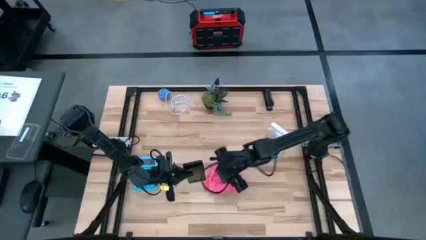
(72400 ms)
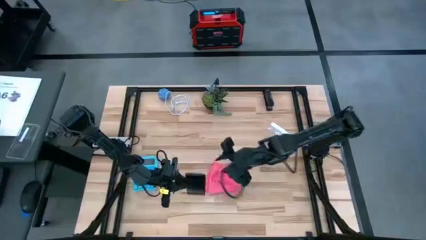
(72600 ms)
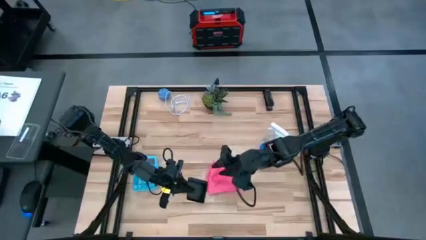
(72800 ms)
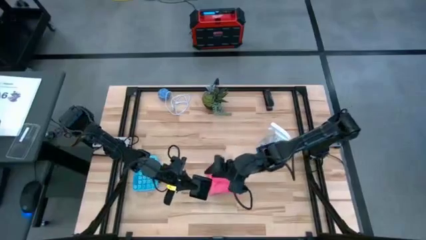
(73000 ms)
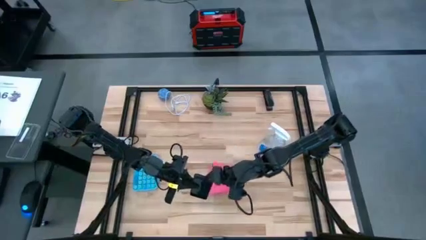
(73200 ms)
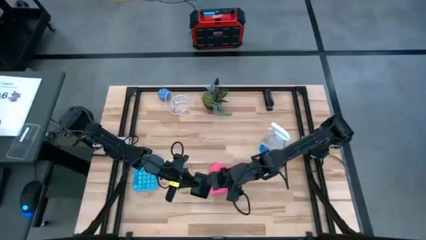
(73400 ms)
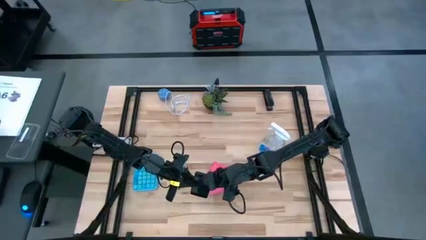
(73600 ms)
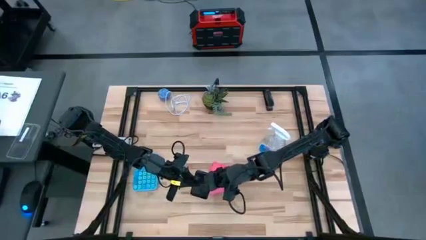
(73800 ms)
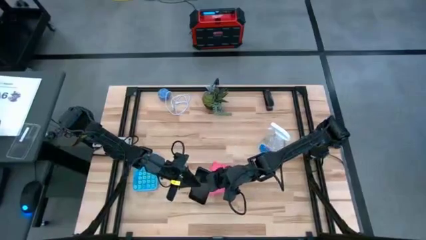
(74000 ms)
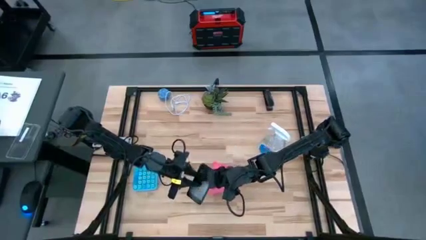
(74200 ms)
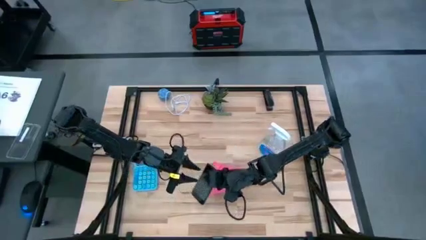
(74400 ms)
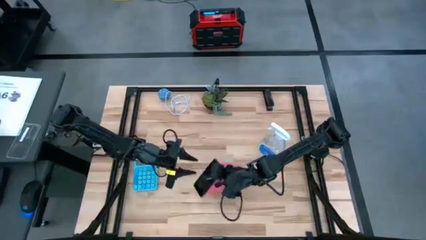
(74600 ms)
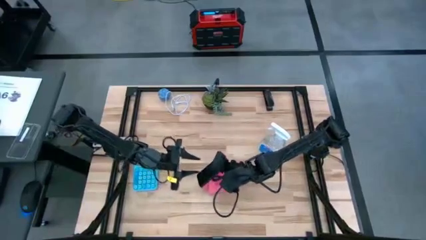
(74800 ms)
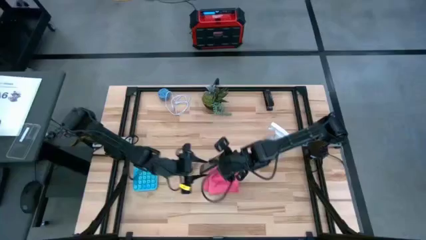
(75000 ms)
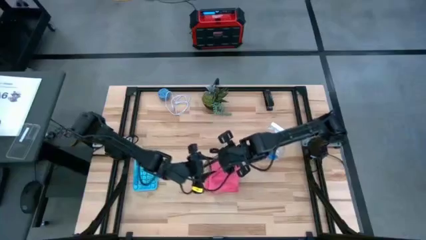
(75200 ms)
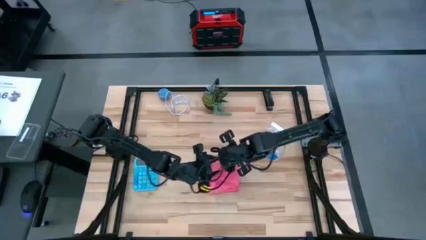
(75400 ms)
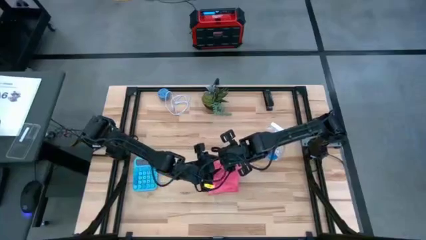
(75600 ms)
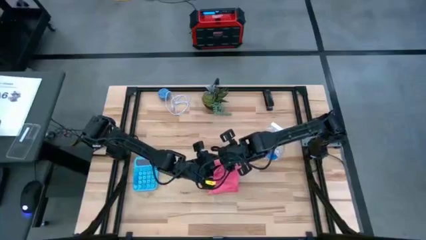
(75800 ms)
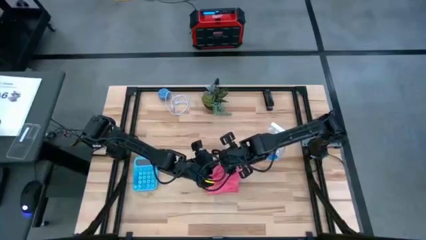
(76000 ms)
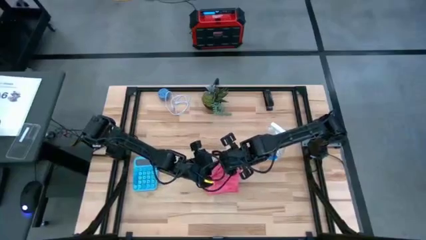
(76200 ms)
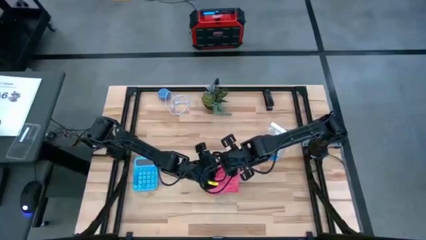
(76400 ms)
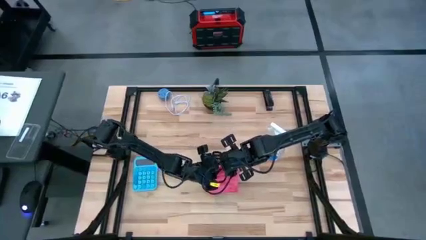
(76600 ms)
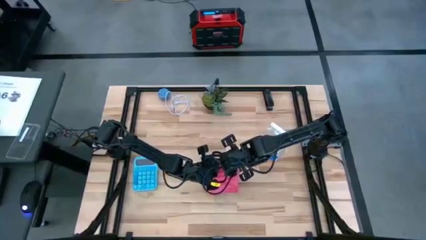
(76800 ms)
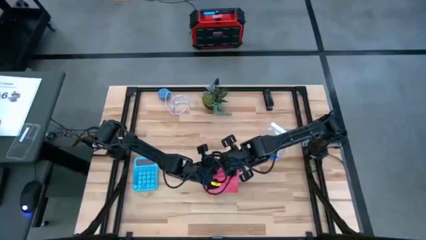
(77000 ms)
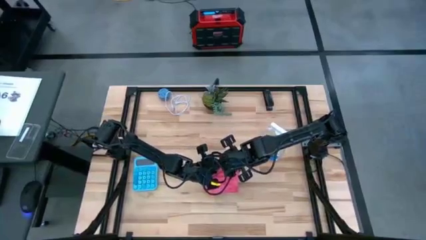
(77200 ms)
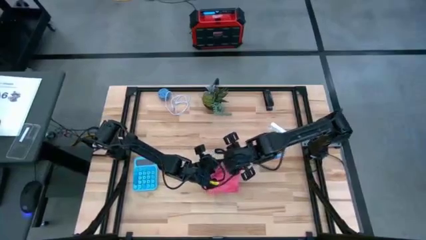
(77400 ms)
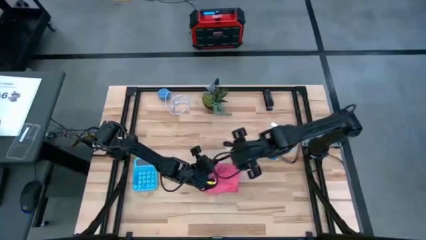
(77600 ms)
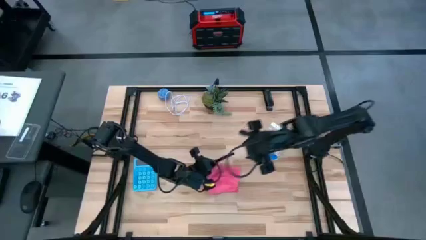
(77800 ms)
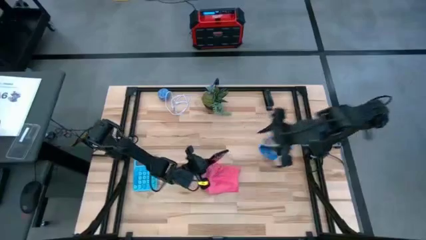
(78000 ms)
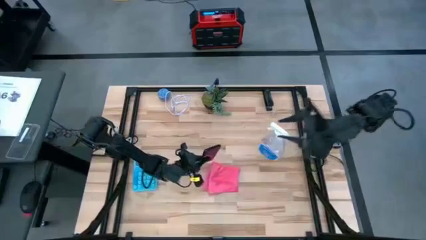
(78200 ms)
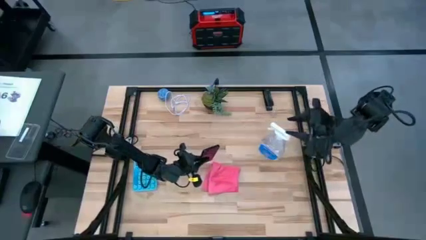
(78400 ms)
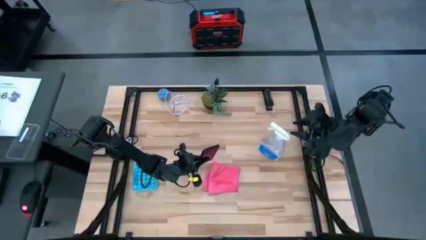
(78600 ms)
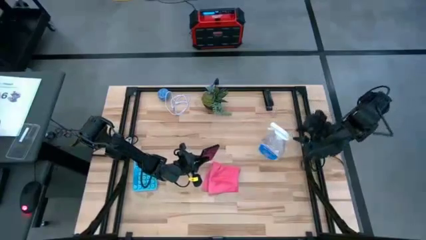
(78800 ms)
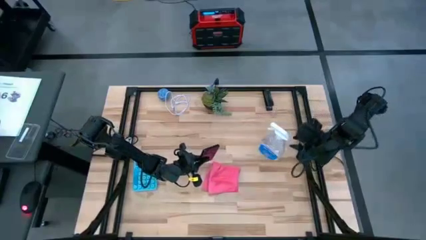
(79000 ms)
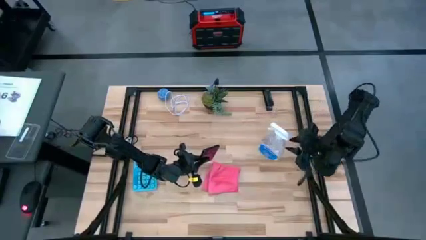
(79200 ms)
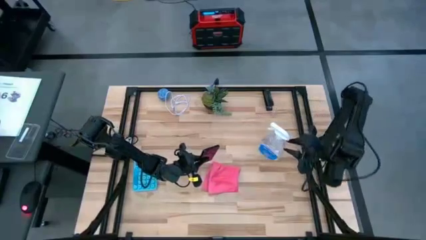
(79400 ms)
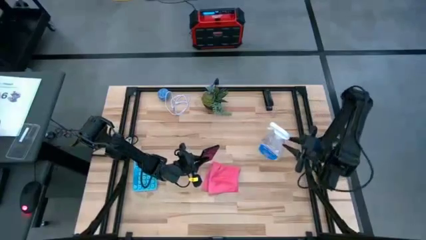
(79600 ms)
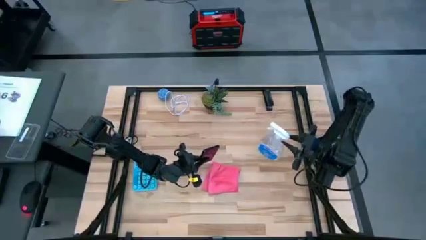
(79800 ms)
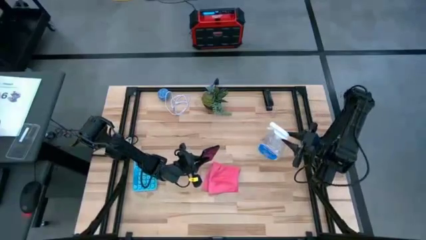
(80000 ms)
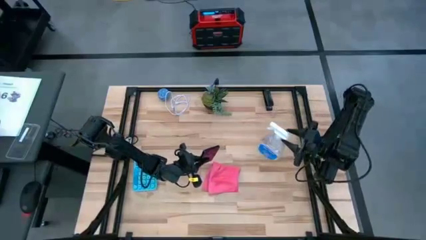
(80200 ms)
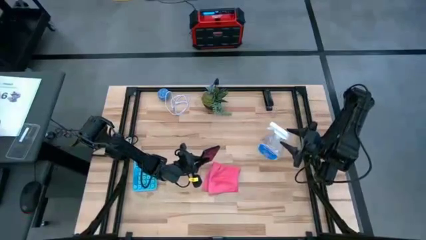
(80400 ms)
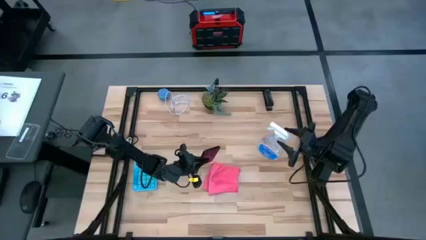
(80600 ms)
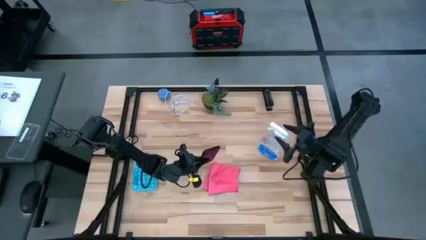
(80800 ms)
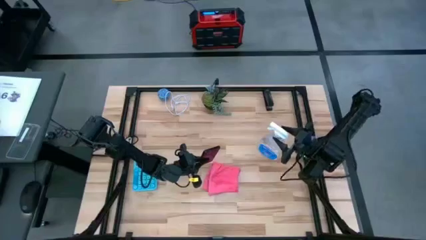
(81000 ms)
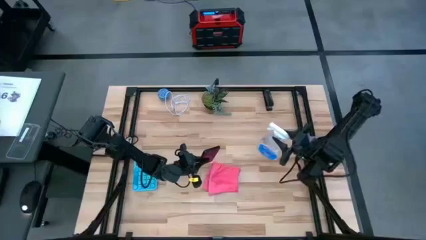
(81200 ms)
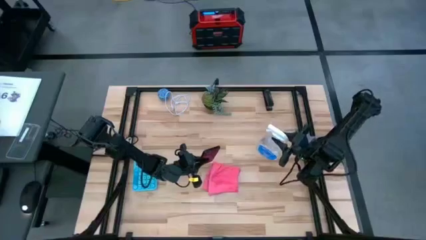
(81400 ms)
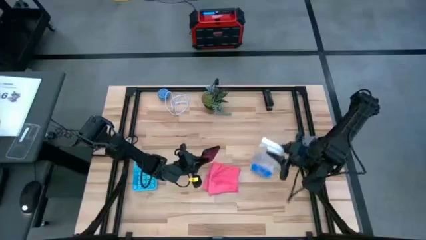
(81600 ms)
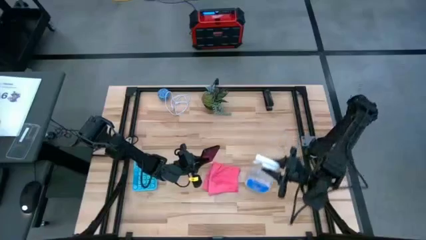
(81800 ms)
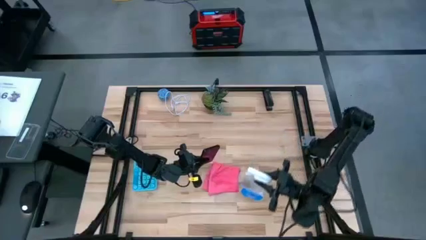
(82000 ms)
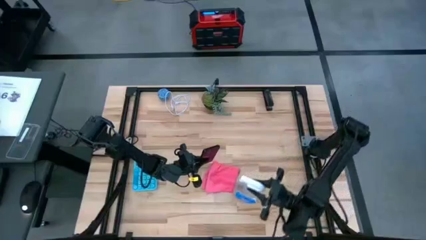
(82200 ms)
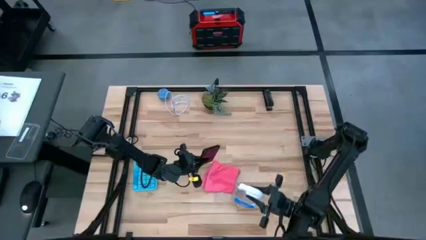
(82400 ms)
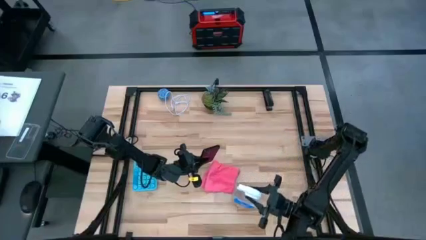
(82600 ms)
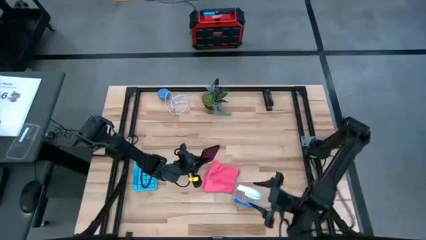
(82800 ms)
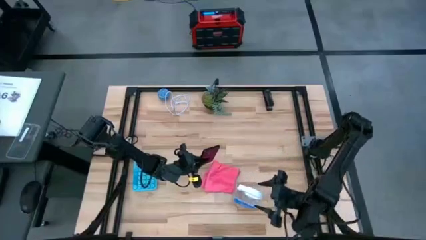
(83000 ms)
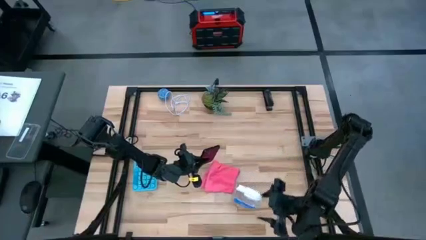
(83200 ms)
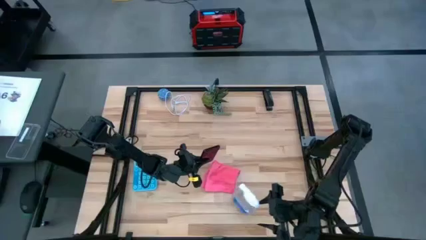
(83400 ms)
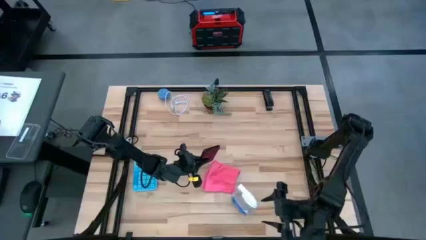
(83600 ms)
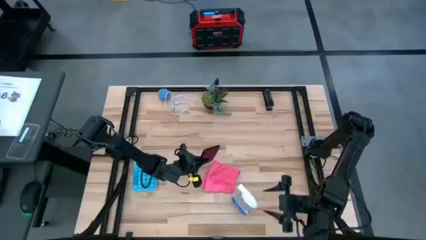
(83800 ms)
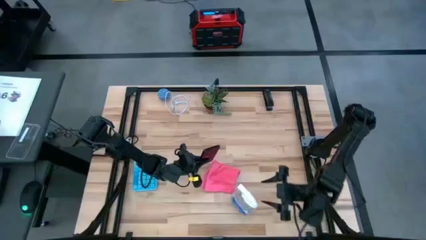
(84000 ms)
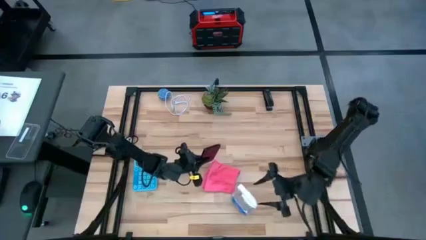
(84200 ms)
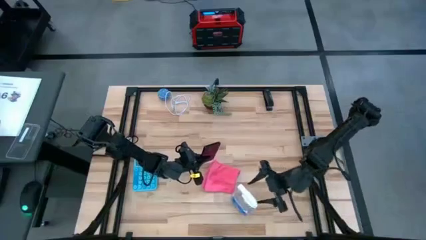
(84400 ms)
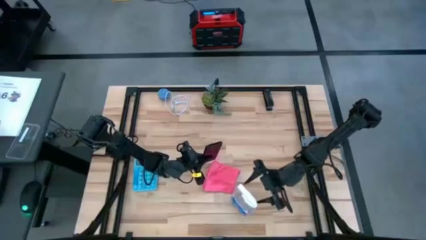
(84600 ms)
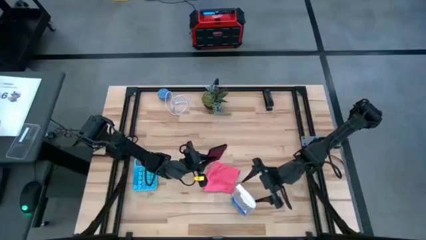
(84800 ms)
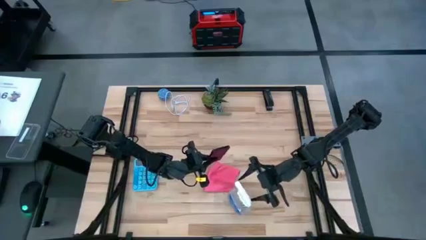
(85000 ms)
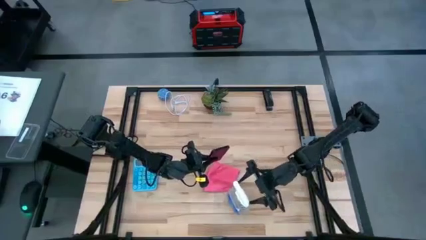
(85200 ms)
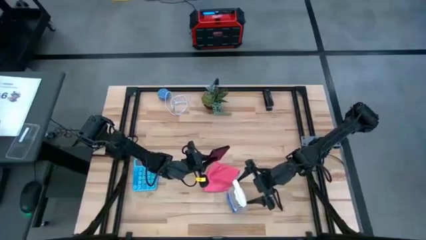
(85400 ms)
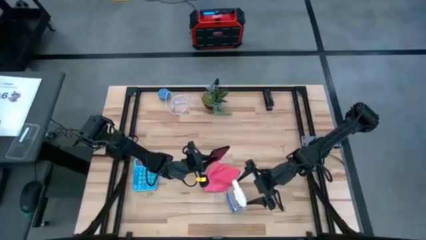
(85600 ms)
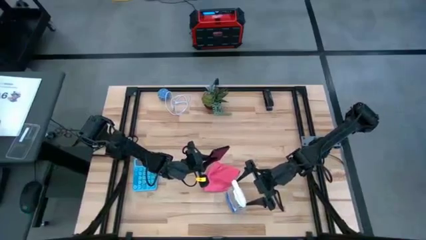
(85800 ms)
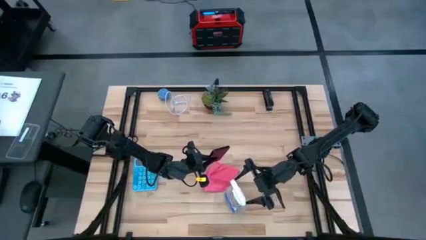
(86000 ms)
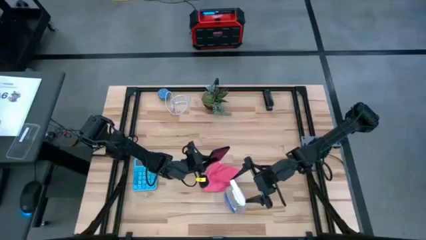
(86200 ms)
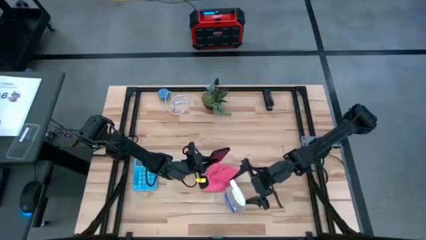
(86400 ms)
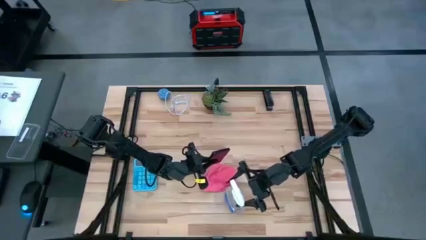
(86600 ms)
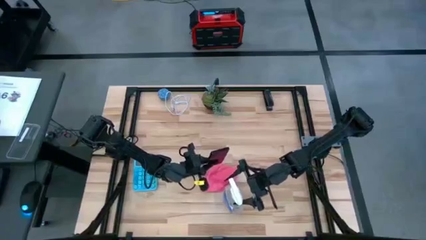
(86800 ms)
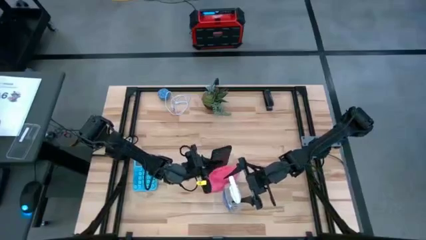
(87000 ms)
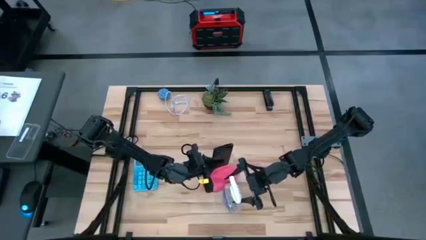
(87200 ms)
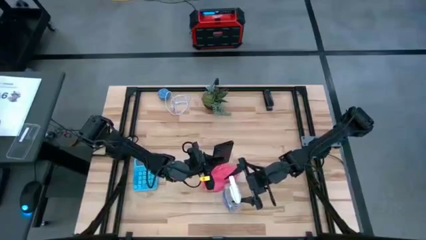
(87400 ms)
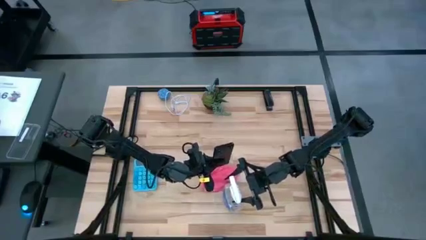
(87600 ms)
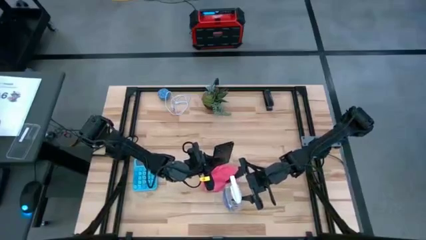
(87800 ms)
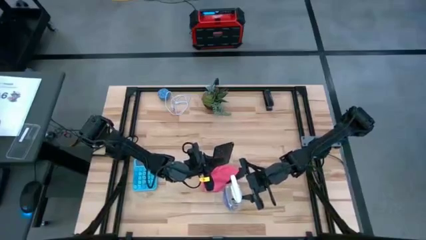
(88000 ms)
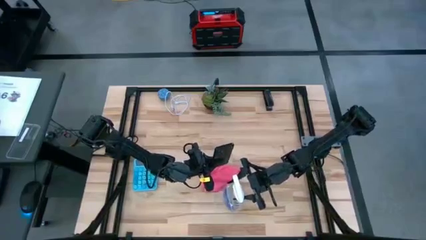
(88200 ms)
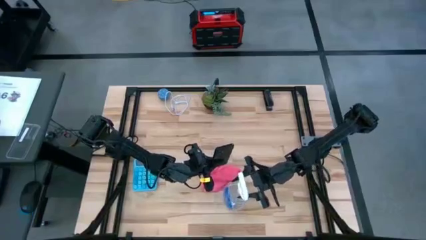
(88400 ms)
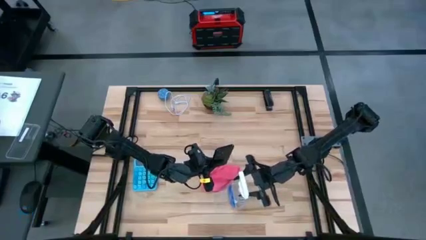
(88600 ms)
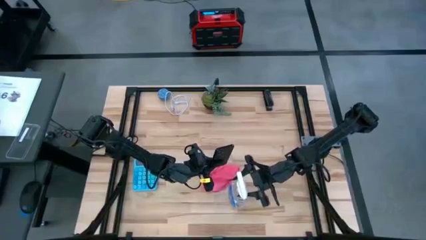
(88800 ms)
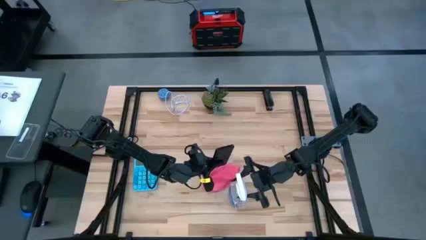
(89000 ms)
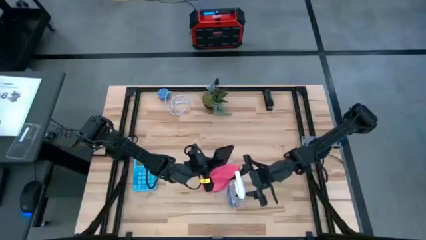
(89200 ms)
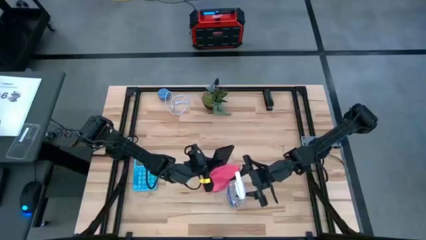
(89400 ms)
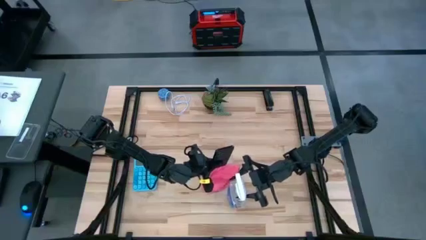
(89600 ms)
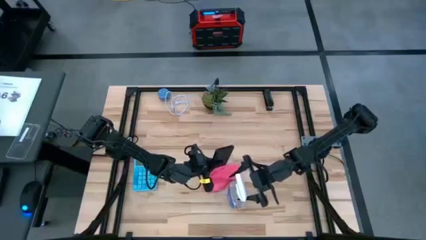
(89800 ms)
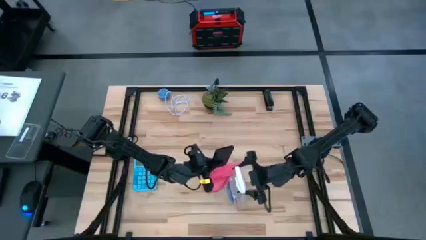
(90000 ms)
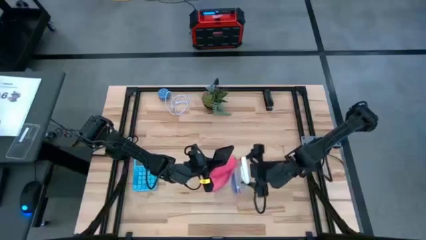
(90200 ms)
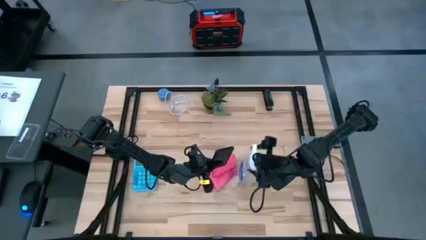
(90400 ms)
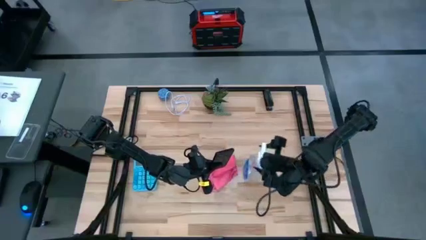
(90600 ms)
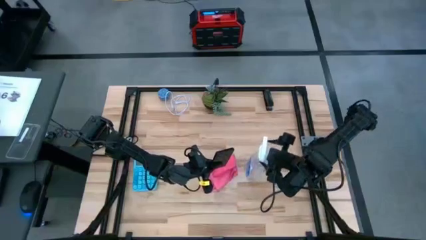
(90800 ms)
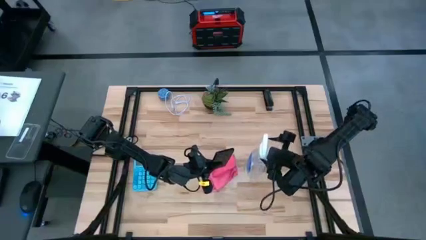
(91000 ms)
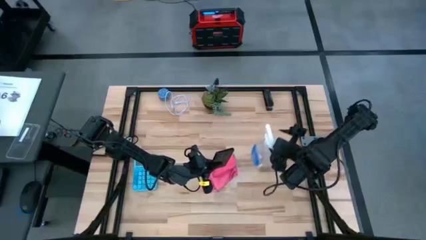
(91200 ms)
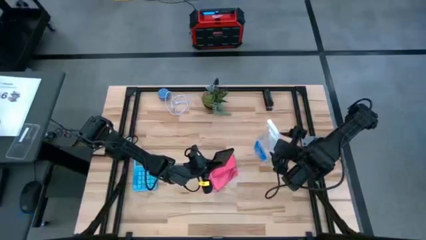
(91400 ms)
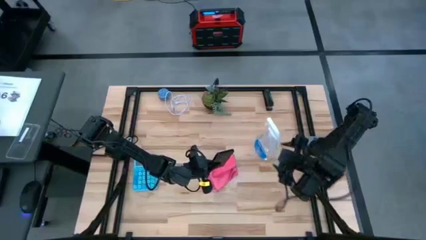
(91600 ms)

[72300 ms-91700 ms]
Task: Apply microfiber cloth
Spray the back of the cellphone using the spray bottle
